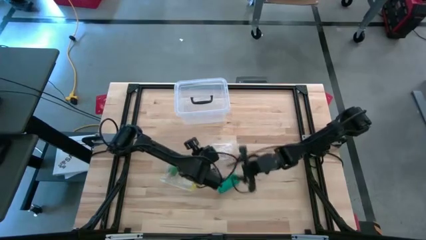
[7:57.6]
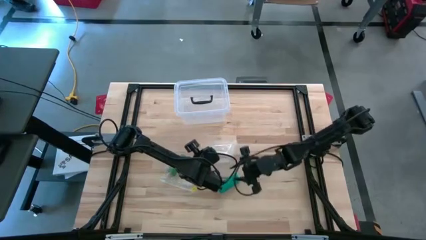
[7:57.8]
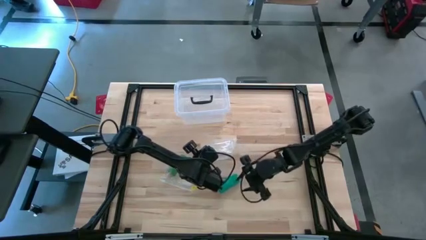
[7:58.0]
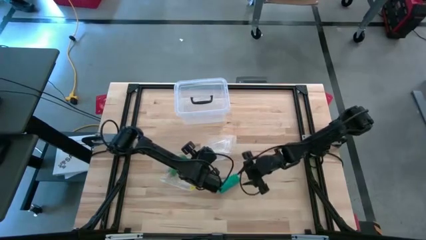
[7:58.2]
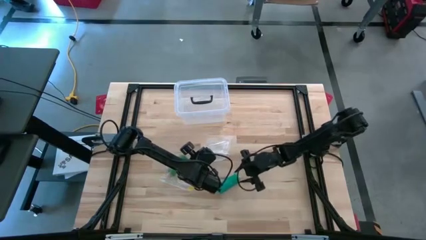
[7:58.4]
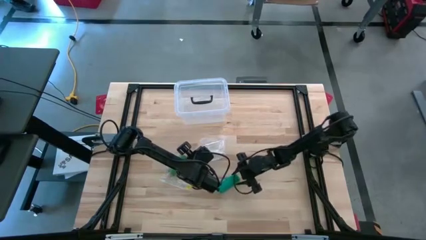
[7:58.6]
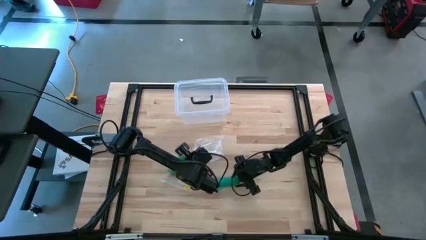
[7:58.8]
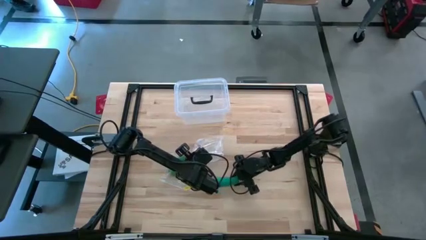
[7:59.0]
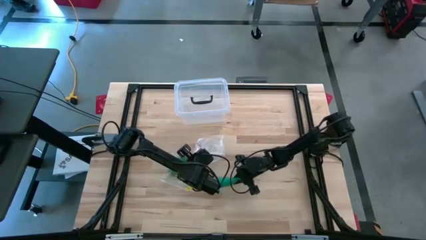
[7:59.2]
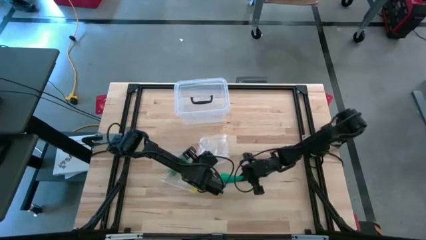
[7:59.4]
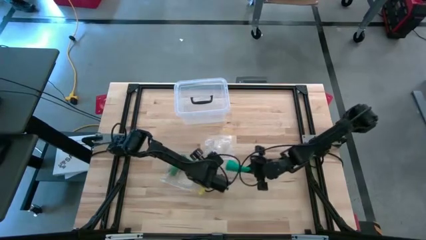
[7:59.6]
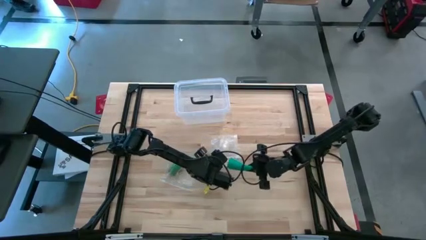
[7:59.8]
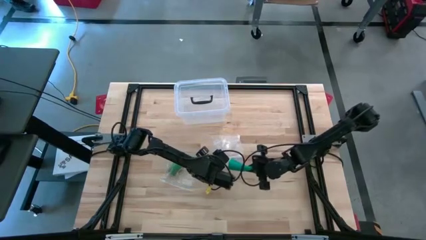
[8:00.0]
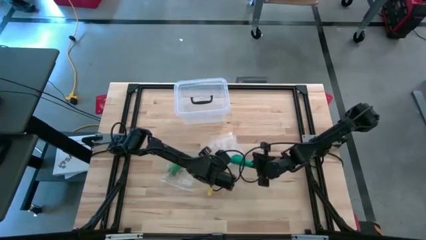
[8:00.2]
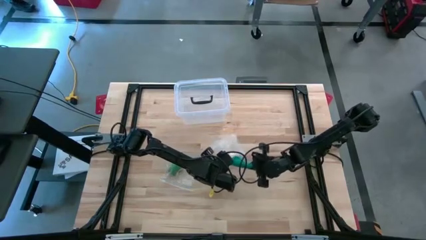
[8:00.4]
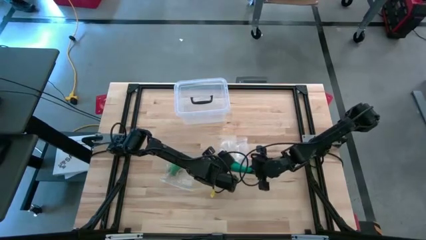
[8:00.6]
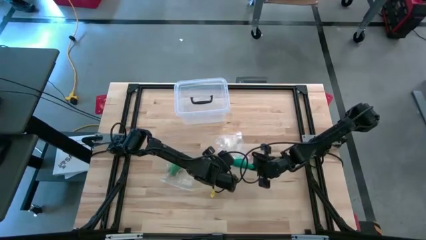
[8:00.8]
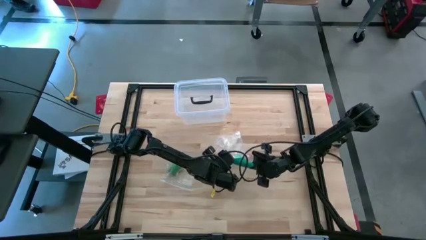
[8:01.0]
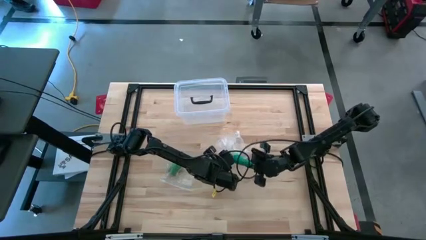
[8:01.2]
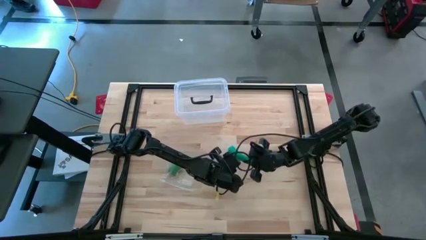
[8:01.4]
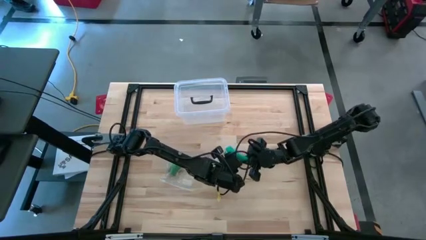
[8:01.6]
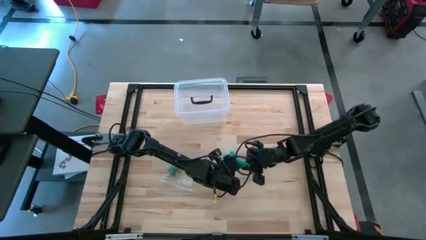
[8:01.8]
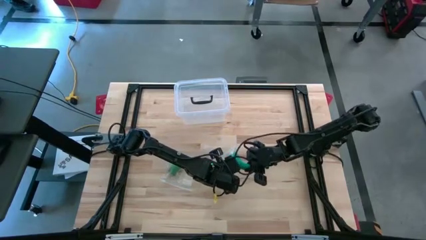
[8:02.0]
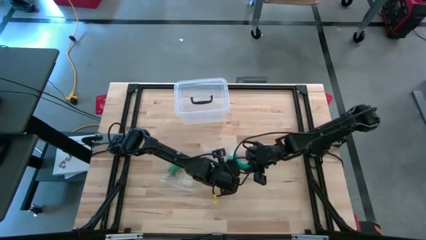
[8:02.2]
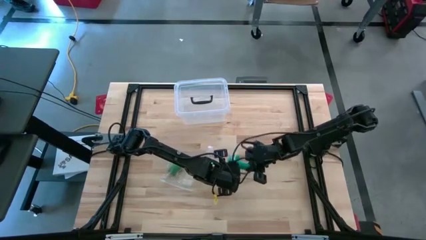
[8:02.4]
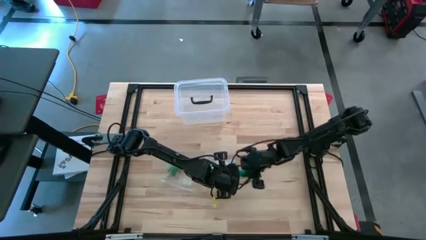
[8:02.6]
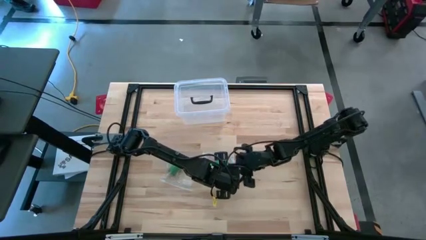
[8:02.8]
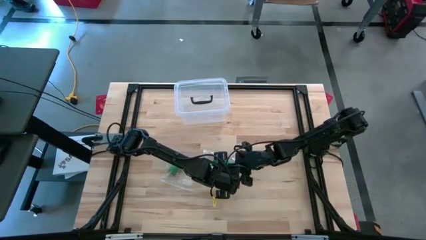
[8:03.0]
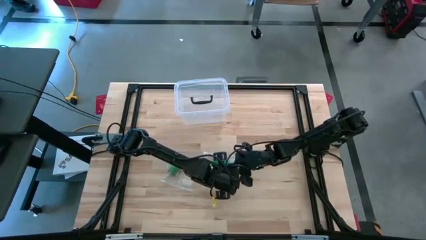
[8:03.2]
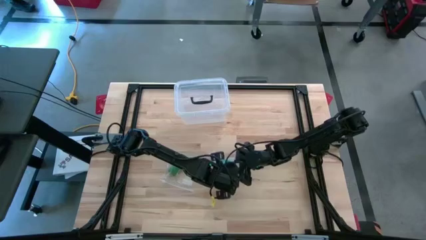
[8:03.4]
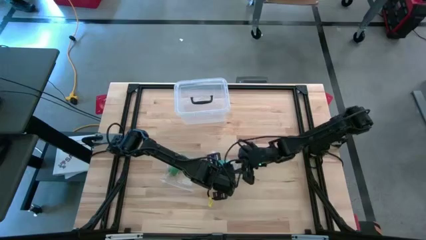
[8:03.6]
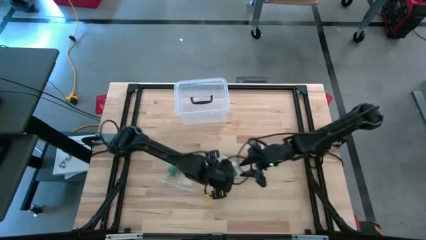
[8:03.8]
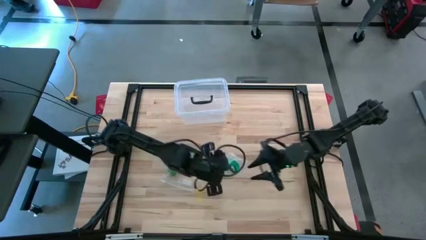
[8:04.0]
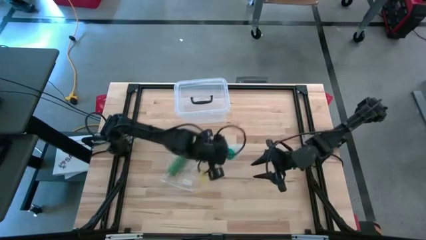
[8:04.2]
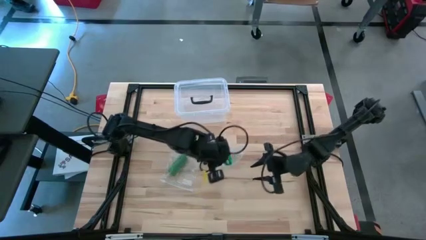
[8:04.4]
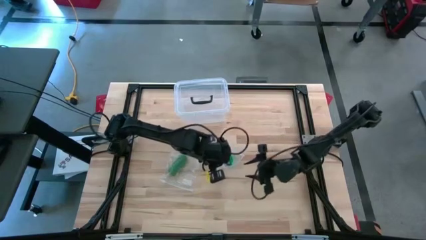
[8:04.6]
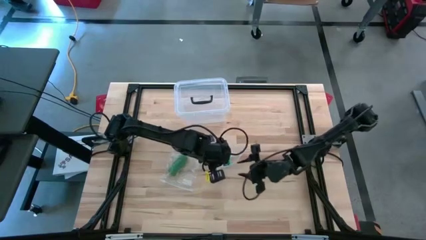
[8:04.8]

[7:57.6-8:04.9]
Task: Roll bandage
Put the dark green bandage into the zip bag

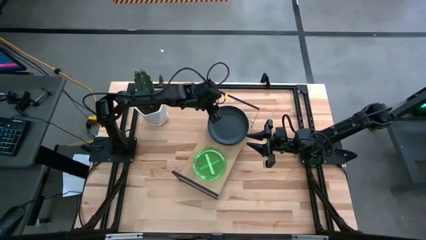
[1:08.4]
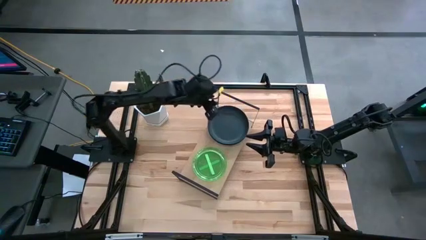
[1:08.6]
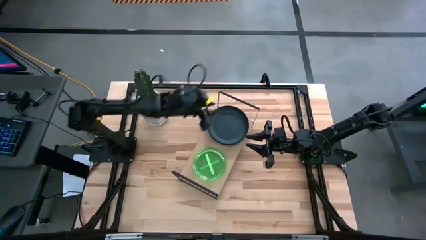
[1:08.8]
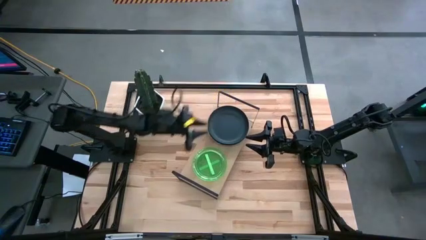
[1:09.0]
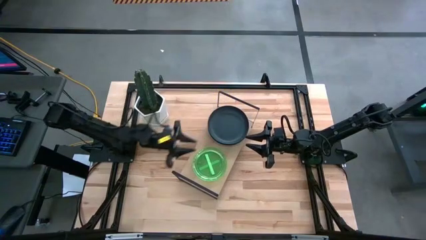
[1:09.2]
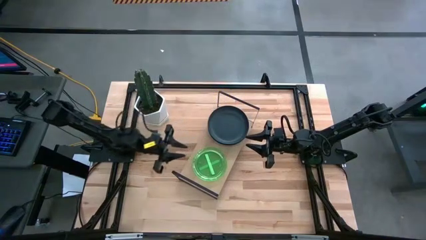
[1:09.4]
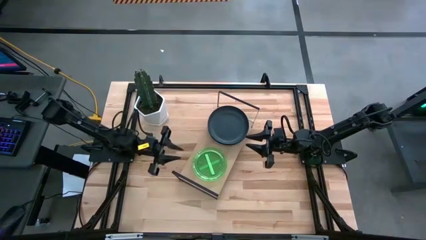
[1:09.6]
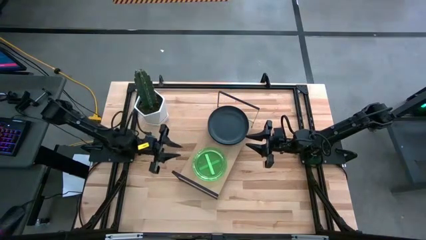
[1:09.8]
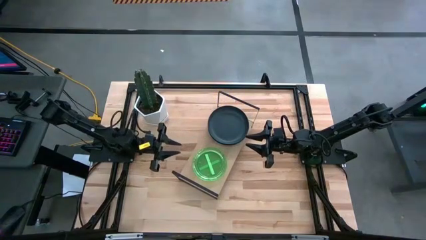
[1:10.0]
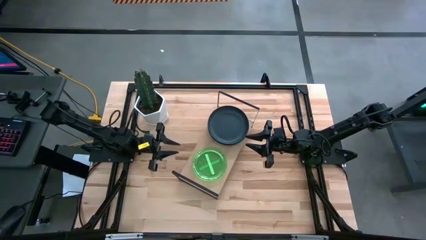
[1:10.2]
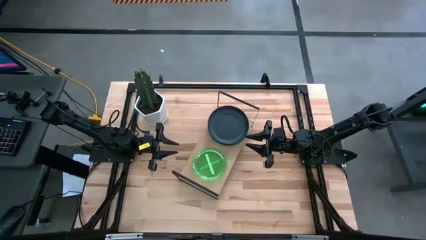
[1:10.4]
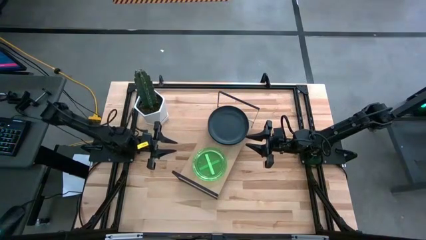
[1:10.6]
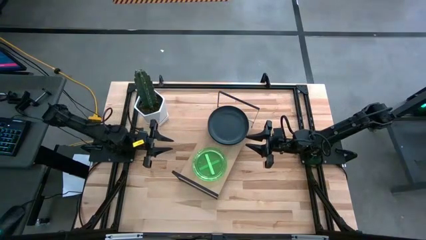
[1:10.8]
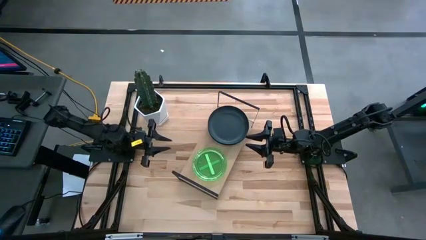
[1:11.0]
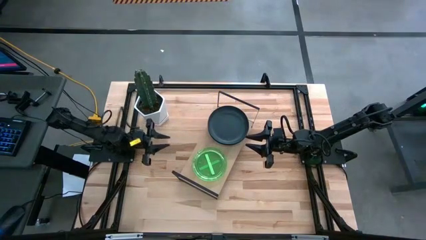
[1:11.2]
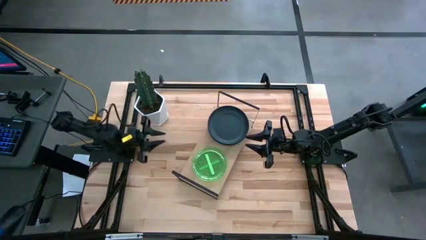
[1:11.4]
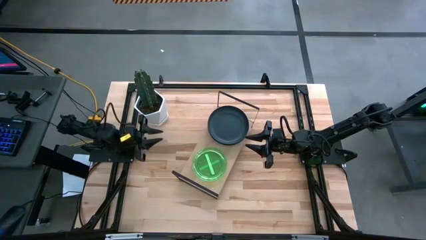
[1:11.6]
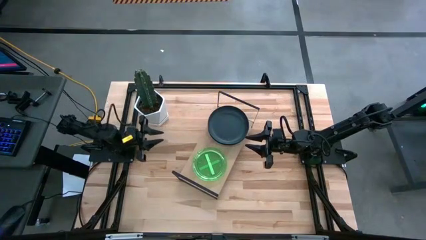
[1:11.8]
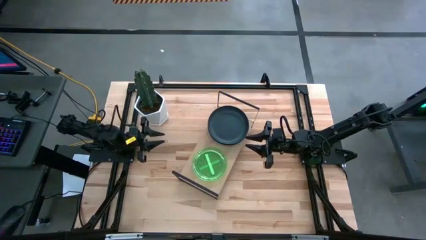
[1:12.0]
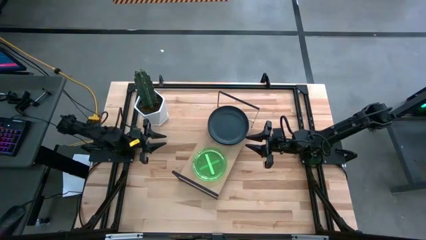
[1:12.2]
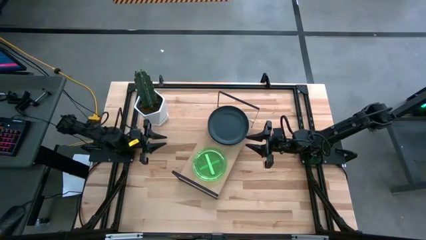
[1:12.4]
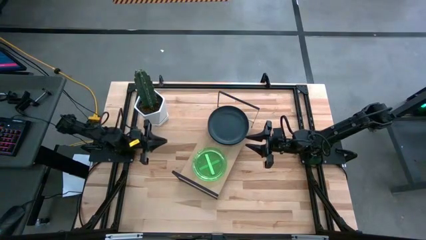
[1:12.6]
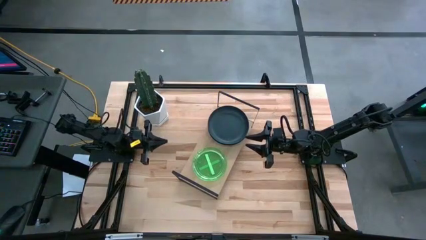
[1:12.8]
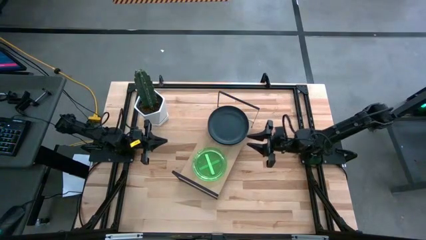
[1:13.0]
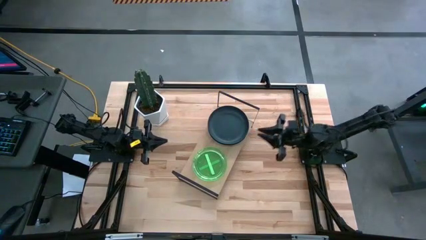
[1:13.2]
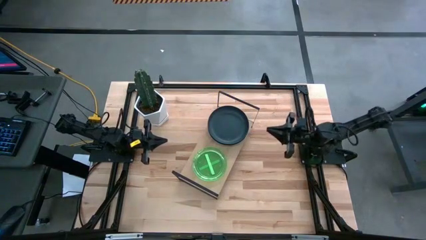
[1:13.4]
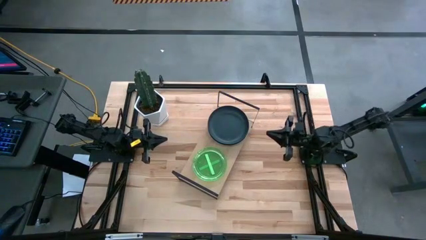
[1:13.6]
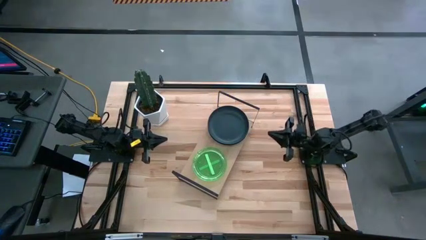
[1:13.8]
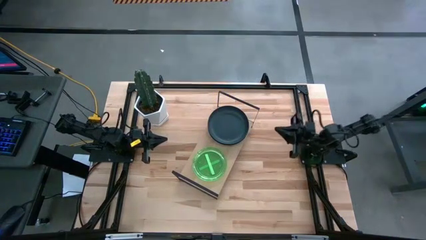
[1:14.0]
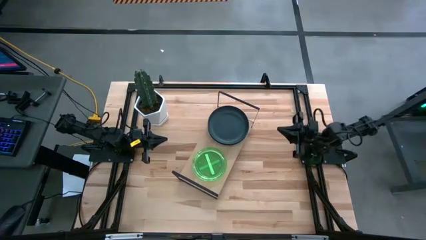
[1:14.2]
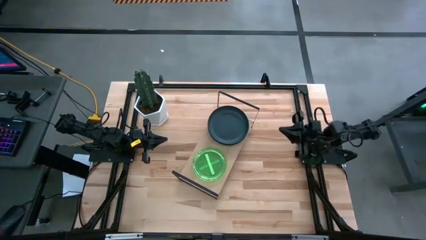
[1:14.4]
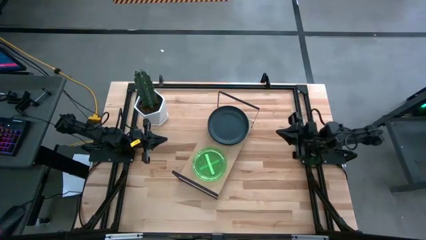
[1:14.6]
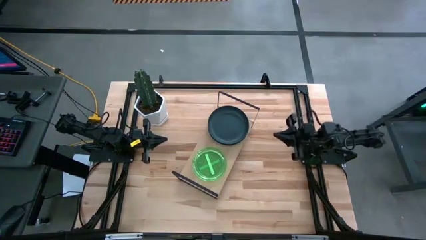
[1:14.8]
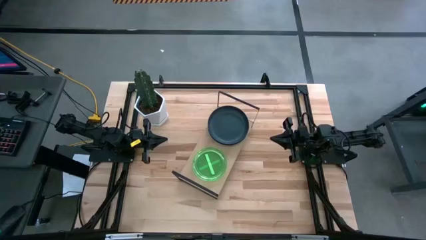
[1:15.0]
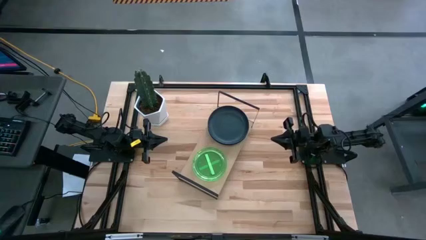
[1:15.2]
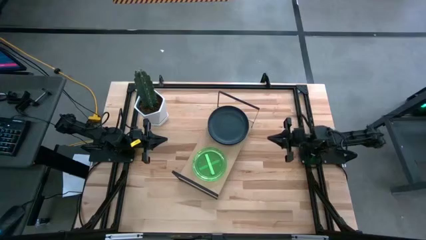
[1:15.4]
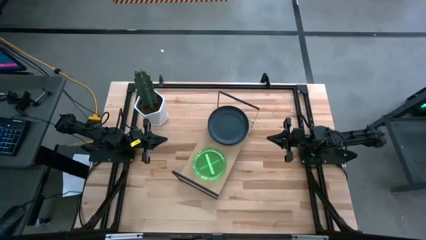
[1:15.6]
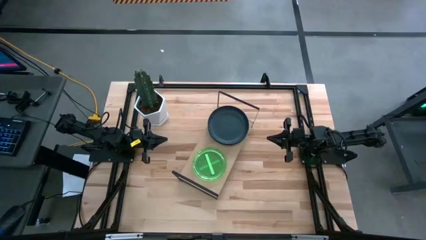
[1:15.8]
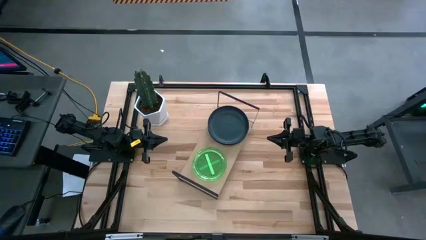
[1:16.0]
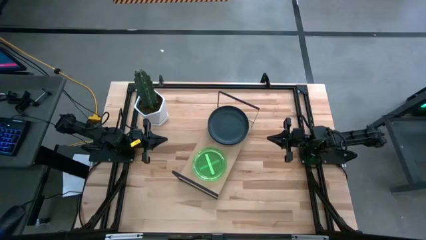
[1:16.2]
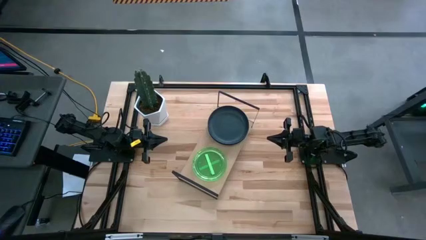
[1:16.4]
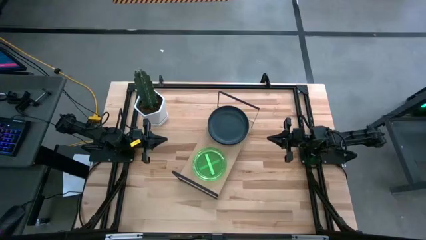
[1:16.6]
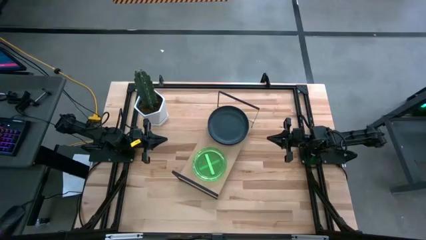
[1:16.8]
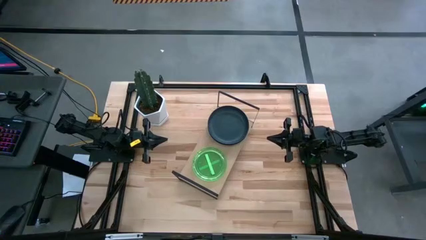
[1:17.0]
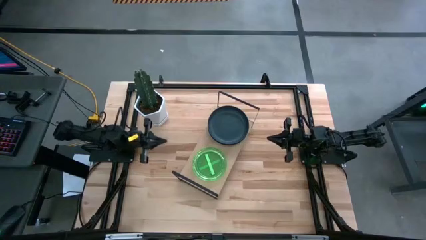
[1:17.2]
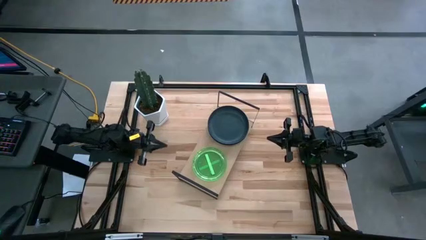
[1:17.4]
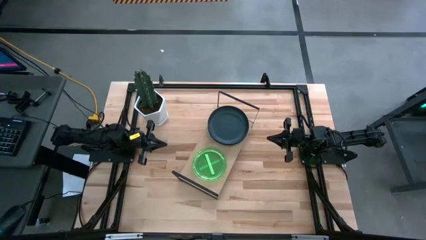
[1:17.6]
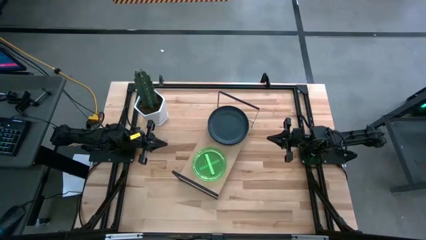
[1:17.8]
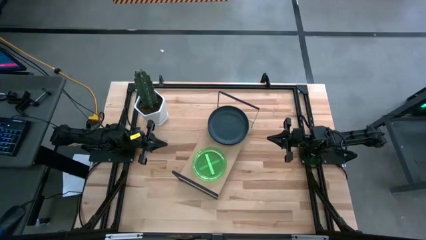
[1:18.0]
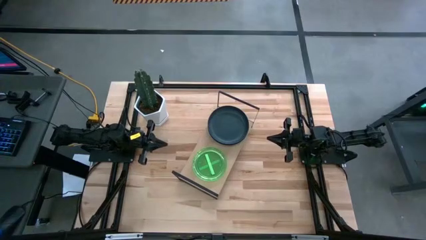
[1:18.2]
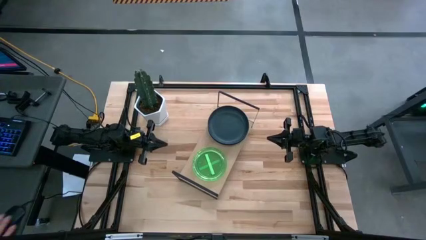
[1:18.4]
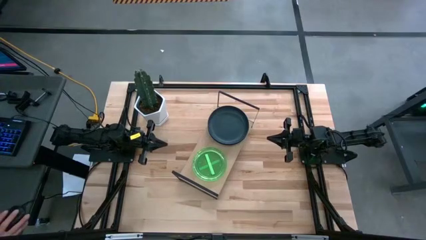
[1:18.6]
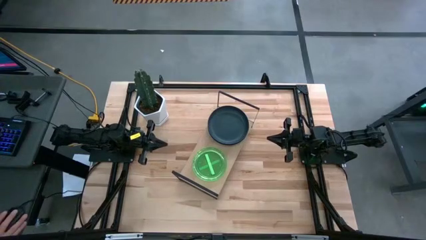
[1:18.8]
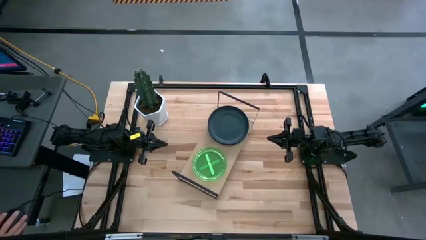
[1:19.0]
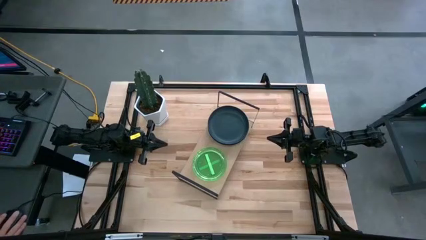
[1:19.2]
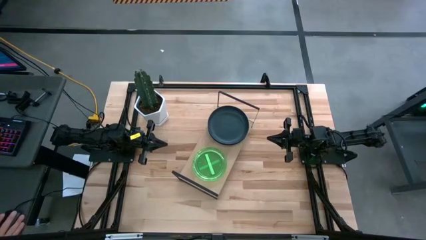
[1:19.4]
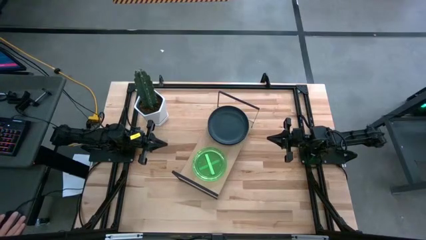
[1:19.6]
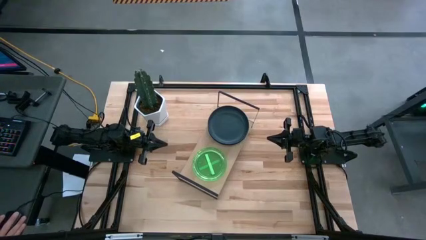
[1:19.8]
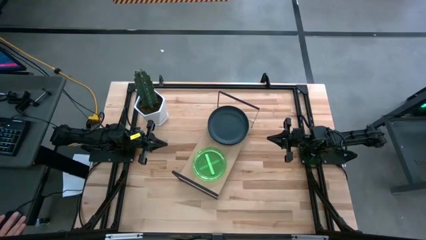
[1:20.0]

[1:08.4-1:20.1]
Task: Place and stack plates onto a shelf
Return to Home Position
